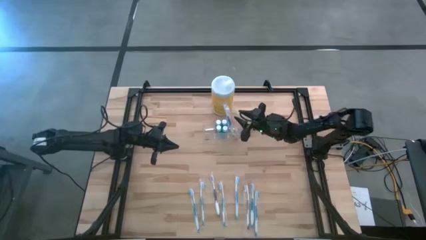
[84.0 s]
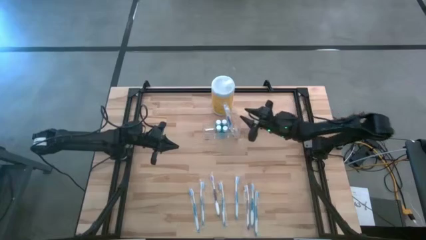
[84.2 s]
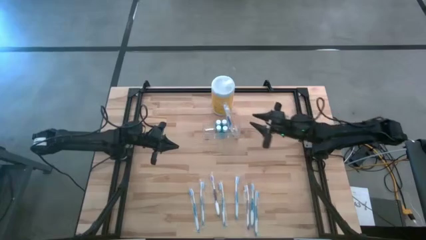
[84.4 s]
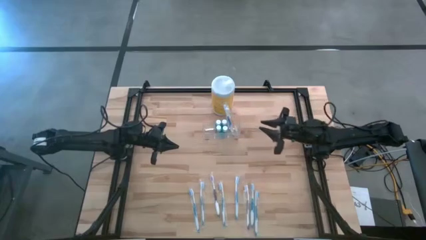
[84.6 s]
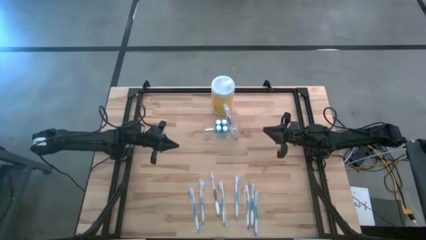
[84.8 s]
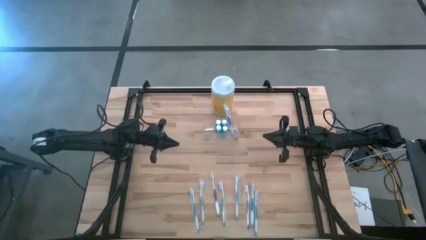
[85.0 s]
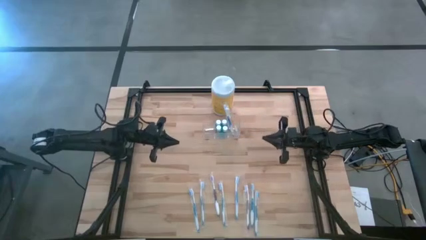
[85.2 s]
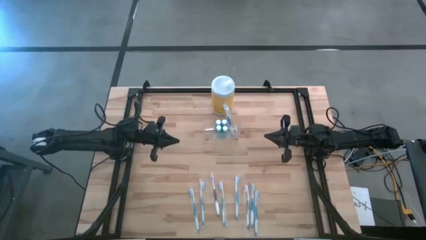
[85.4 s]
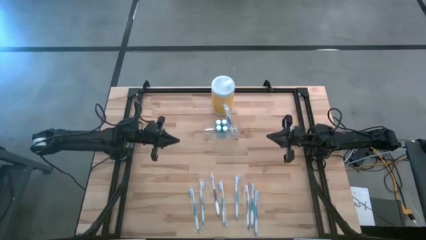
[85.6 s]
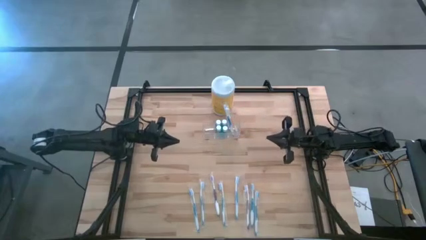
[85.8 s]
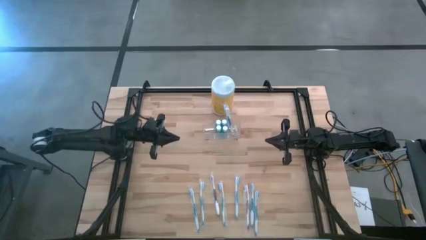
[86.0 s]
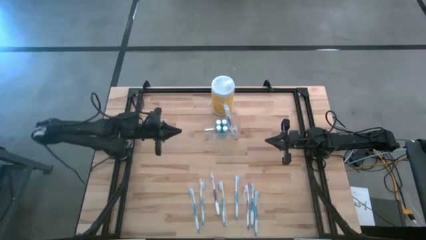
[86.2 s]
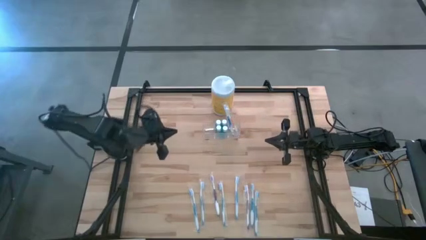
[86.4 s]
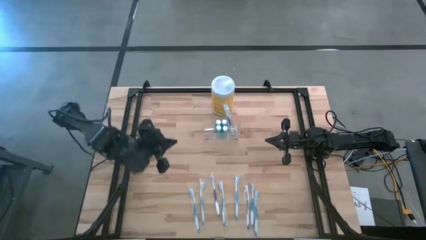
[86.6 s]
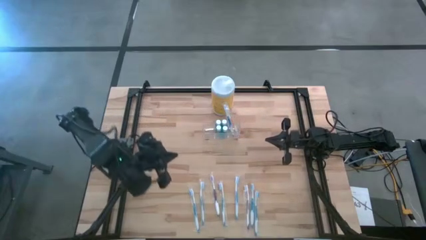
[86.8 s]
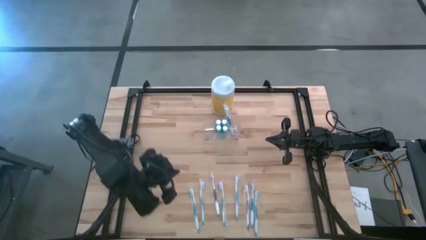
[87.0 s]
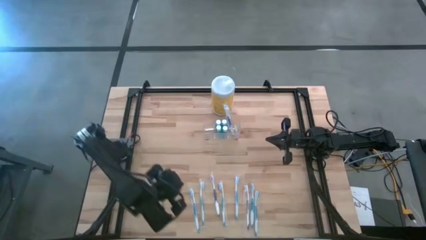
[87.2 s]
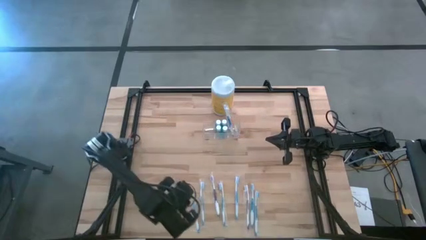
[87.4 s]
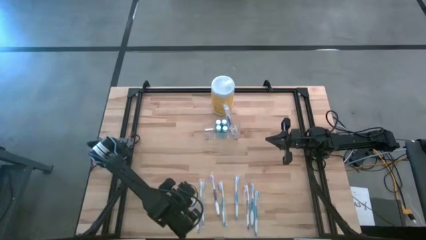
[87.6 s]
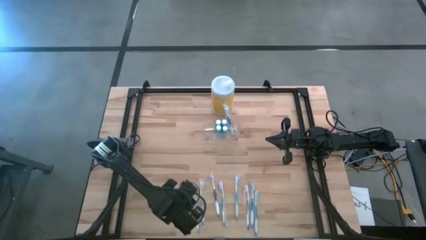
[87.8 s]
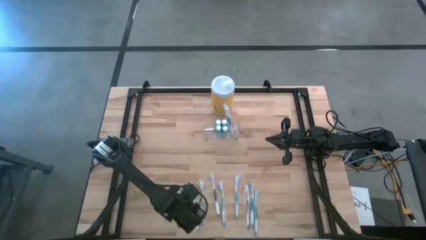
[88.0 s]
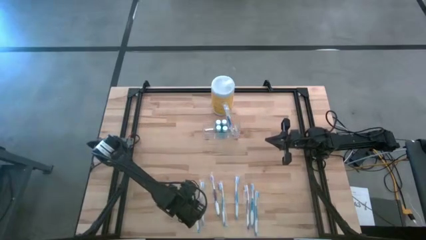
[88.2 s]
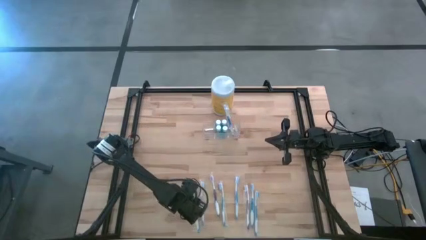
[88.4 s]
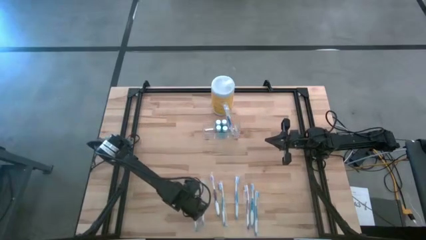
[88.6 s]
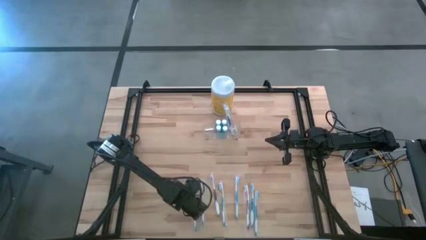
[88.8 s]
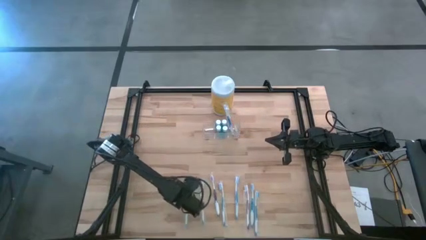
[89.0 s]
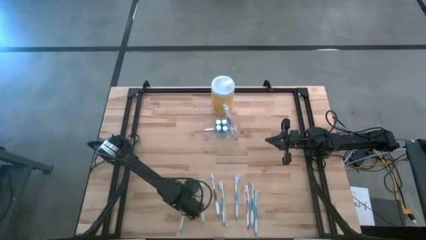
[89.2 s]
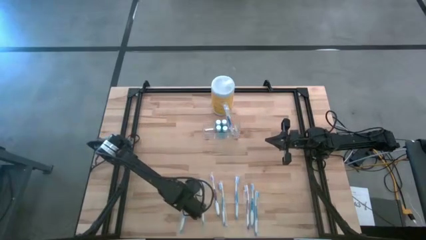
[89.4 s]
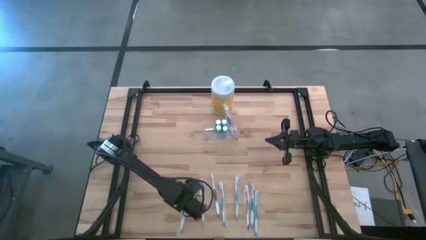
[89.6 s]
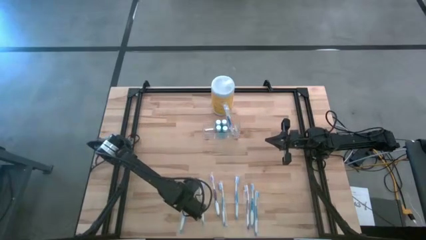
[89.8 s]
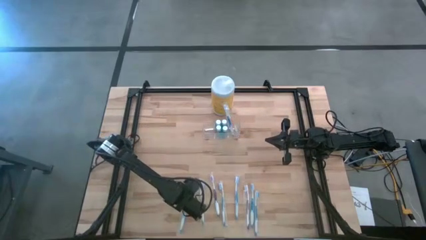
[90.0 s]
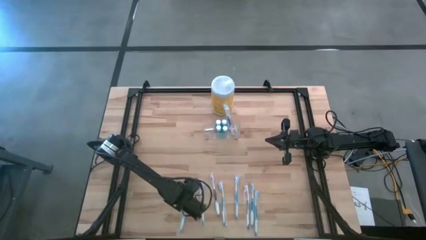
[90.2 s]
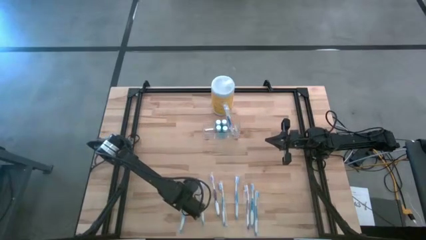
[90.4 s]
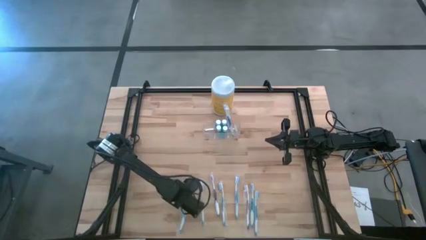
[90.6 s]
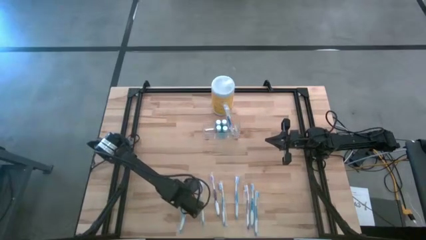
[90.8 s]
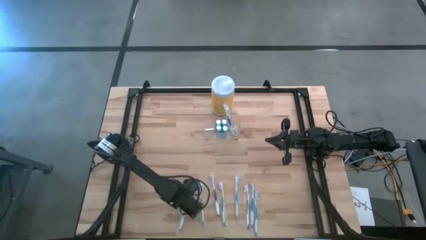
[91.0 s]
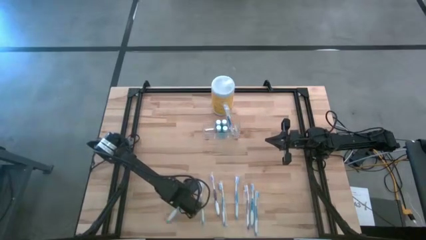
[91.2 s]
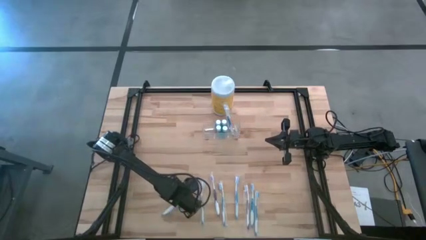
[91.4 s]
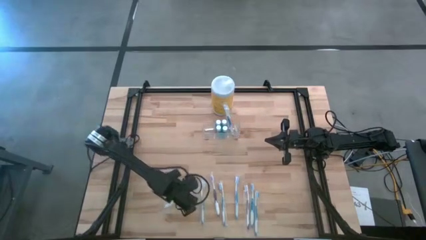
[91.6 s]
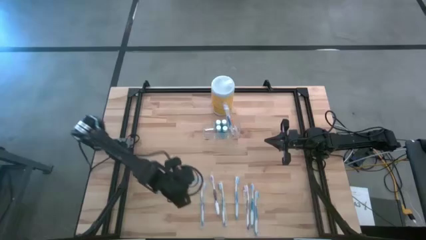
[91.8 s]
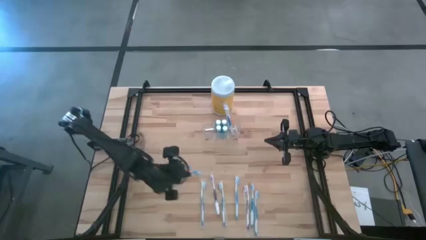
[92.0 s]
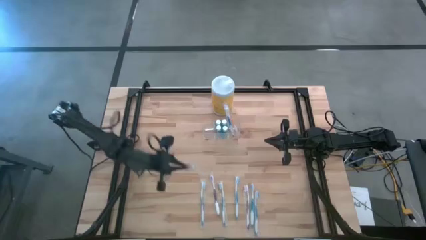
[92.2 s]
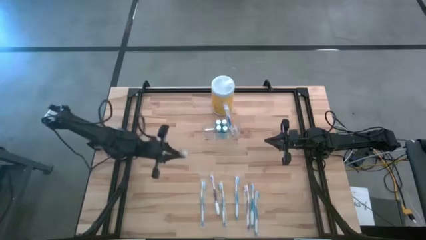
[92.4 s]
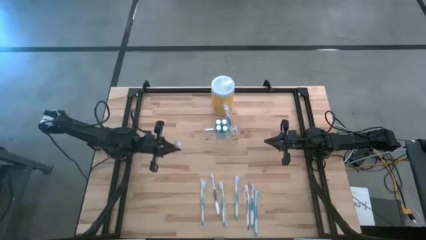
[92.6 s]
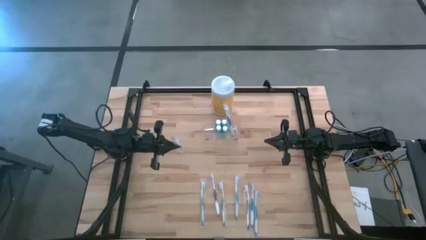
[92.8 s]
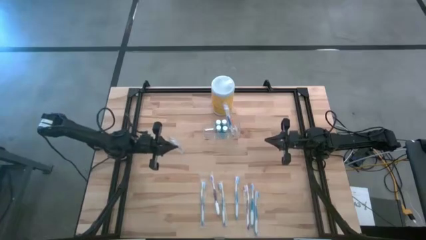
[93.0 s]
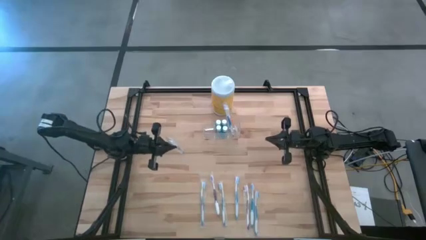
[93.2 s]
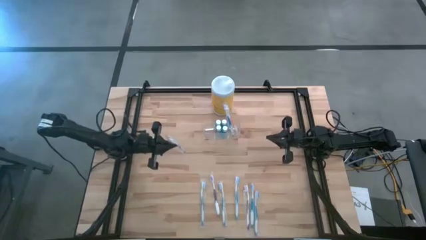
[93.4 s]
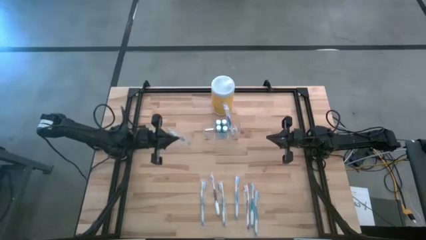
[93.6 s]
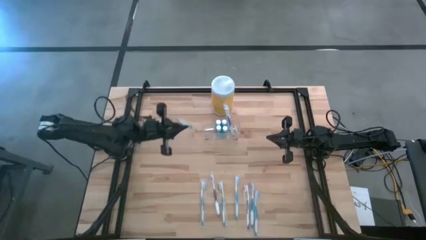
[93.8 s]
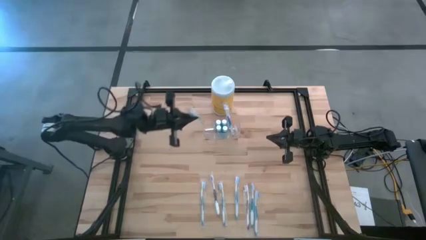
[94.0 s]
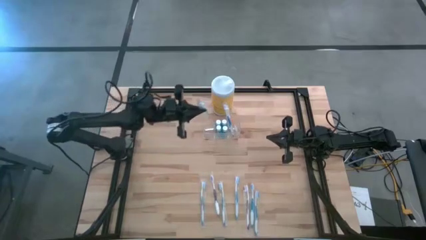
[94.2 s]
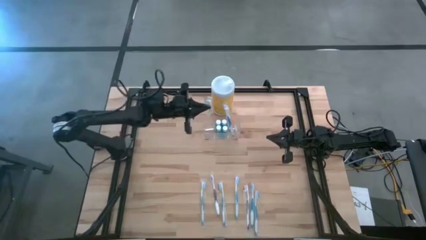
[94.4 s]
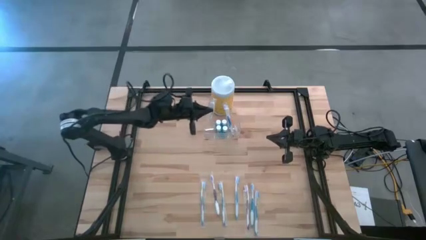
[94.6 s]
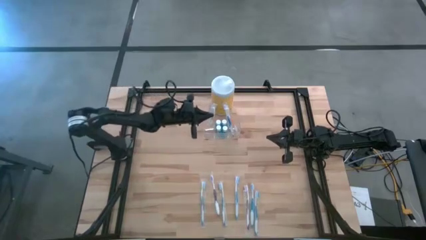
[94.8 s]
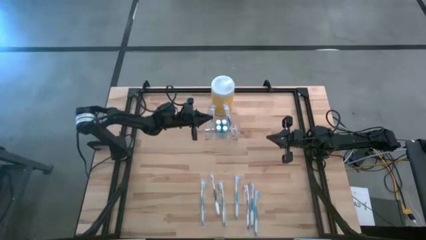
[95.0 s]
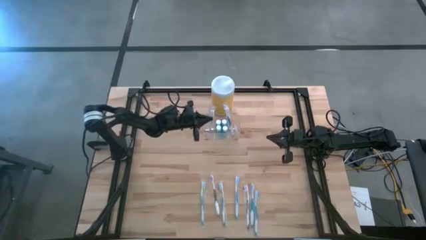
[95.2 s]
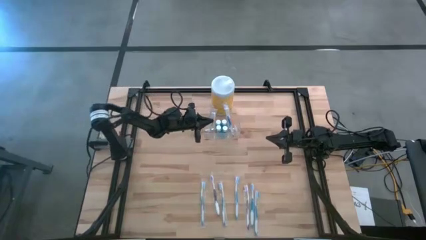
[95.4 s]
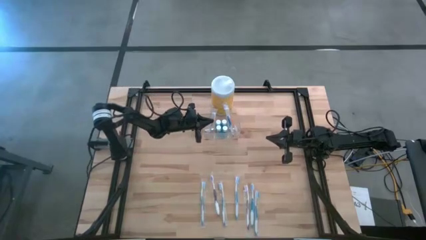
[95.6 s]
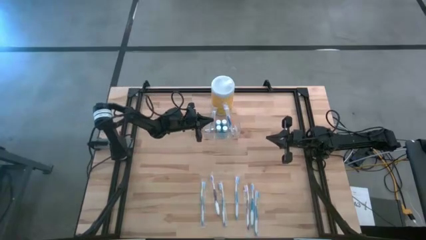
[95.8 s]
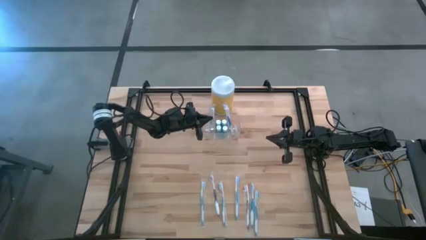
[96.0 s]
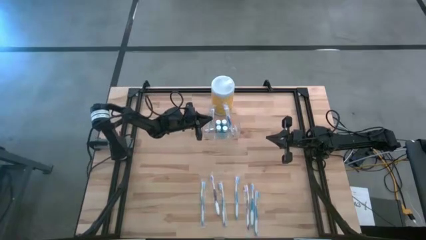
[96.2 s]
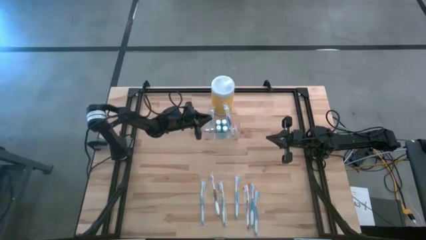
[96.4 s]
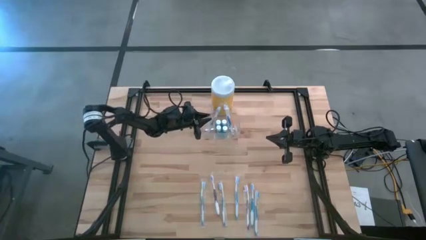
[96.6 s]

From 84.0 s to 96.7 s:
Task: Pick & Place toothbrushing station
Put the blue toothbrush into the transparent organizer

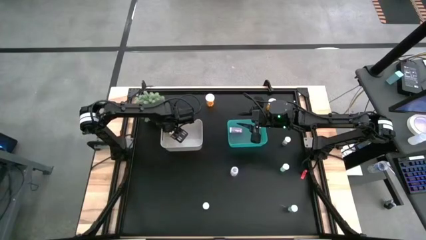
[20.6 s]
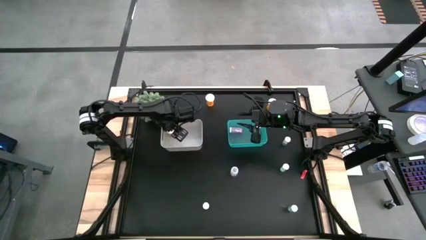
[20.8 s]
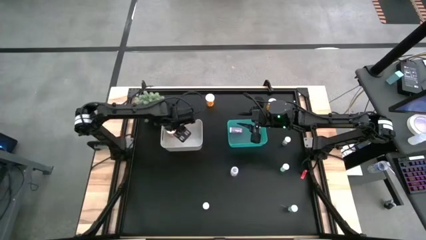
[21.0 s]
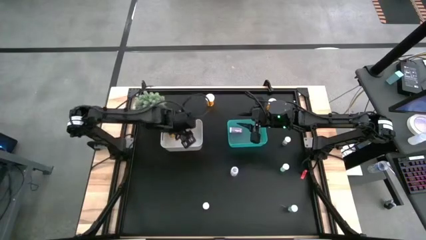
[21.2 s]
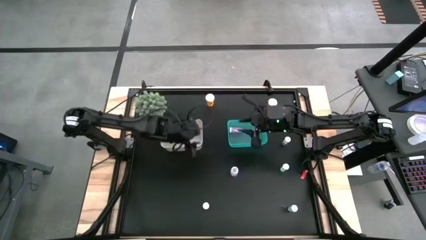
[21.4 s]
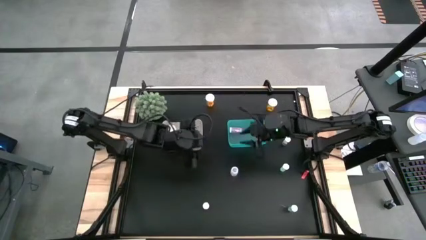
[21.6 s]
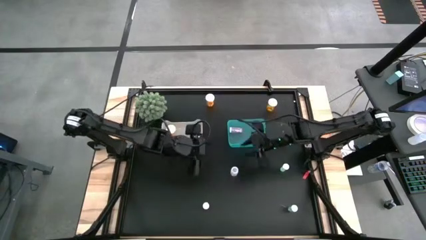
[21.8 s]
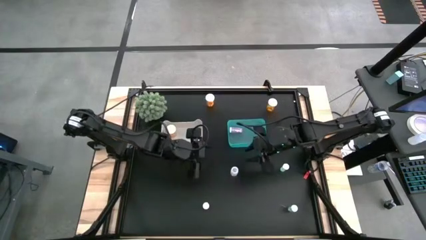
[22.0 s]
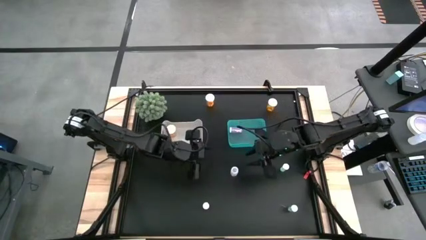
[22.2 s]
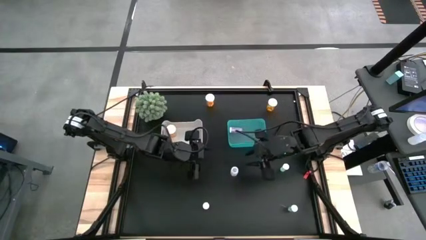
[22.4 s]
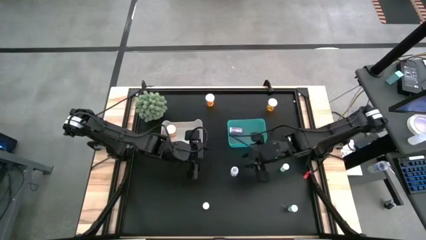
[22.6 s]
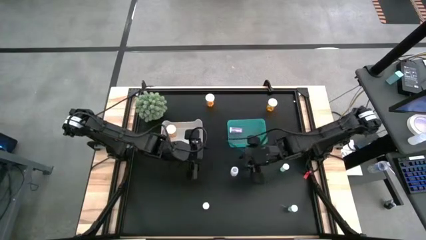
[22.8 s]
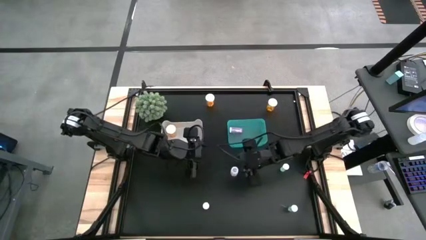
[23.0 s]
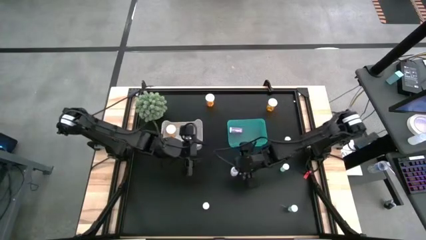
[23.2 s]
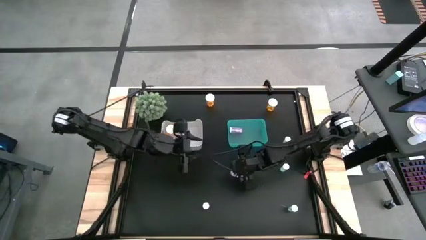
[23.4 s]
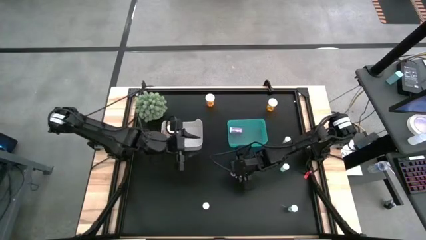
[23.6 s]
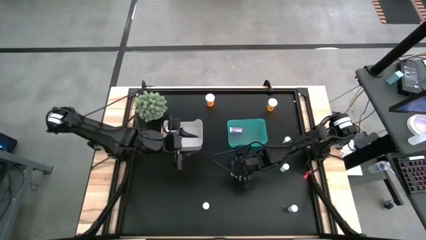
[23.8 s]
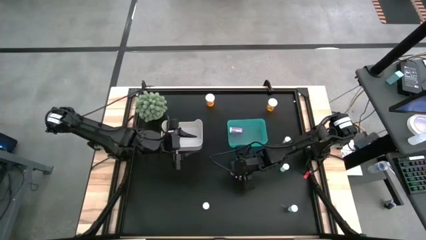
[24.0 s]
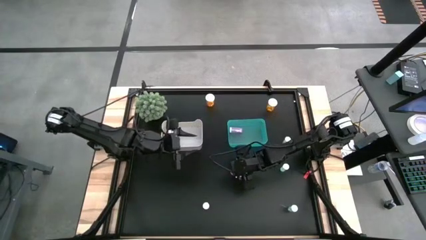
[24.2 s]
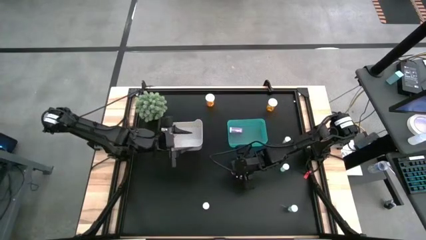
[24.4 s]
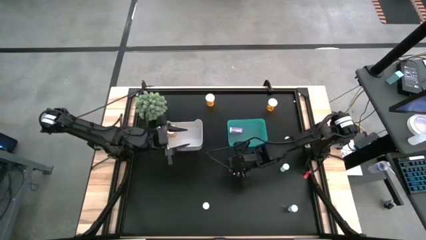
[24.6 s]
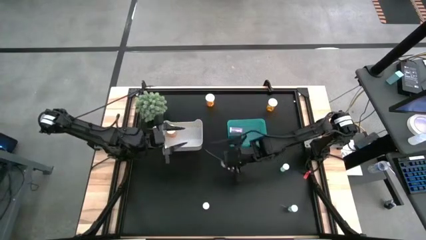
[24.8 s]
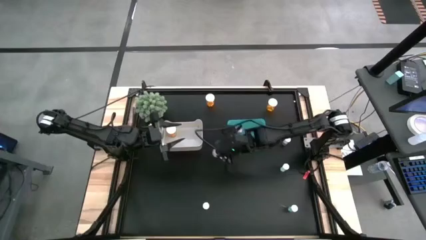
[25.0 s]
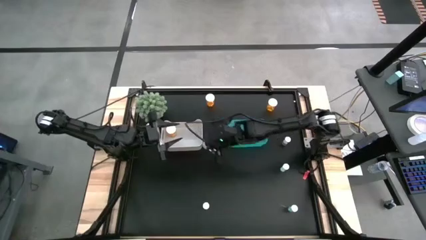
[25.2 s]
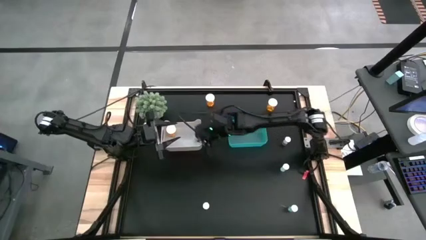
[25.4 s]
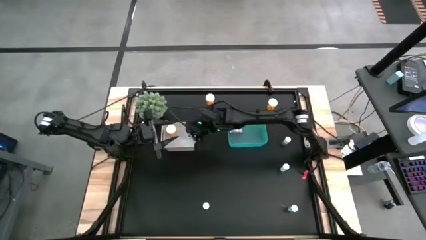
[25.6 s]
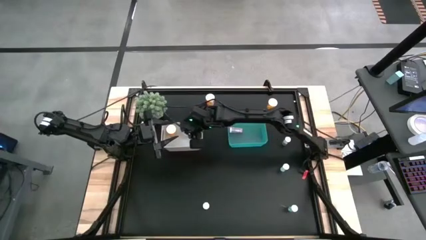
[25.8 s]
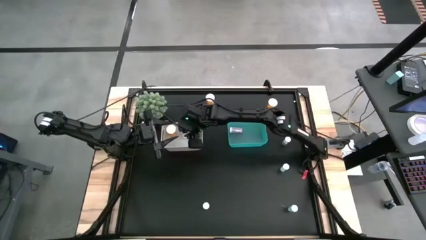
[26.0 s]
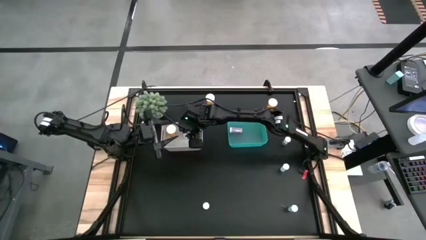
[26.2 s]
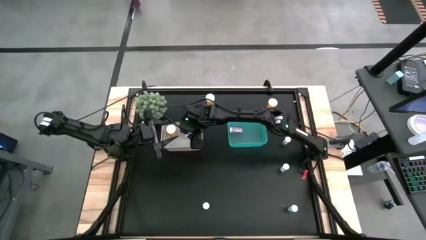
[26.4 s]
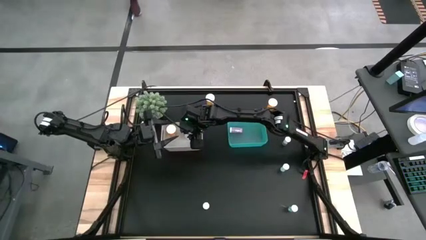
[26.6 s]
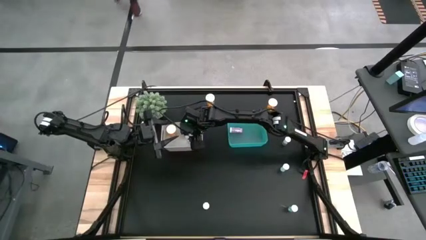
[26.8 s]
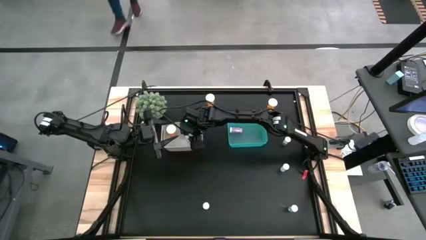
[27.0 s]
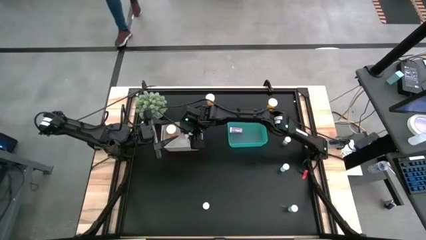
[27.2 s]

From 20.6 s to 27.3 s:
Task: Pick and place medicine bottles into bin by pill shape (circle, oval)
Put the small transparent capsule bottle into the white bin
